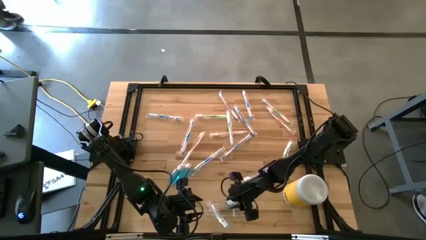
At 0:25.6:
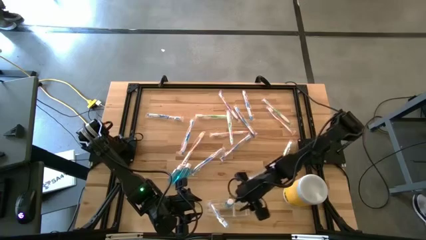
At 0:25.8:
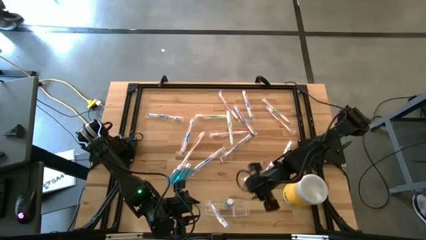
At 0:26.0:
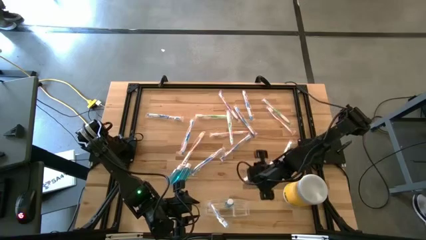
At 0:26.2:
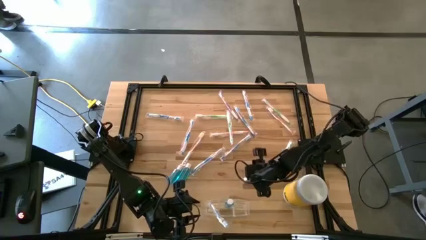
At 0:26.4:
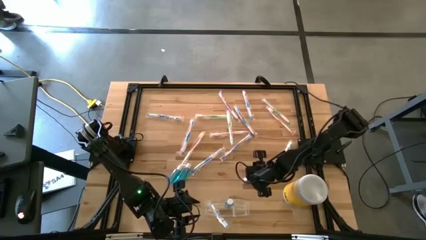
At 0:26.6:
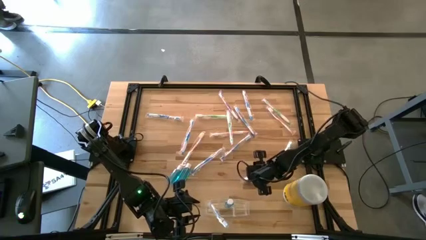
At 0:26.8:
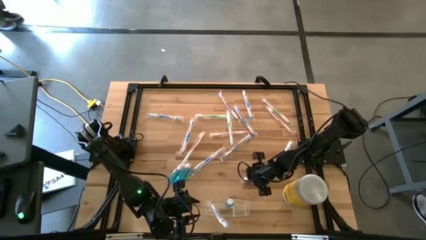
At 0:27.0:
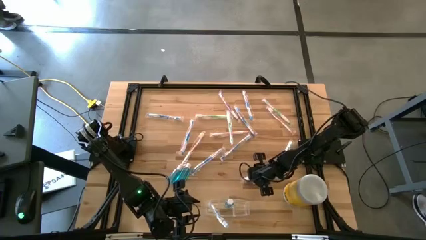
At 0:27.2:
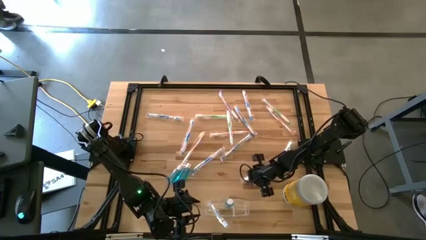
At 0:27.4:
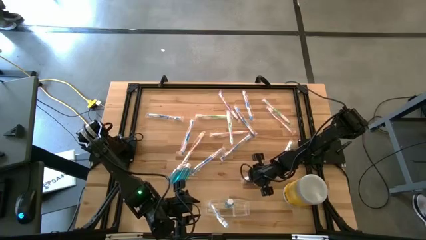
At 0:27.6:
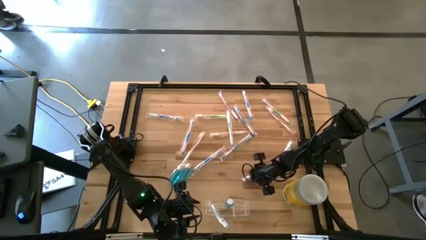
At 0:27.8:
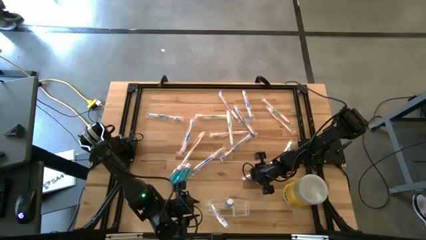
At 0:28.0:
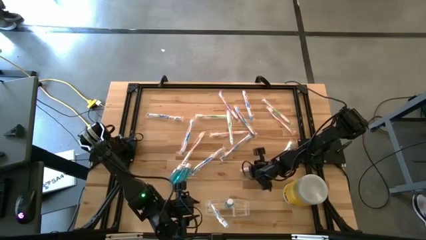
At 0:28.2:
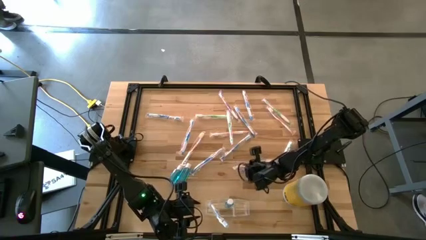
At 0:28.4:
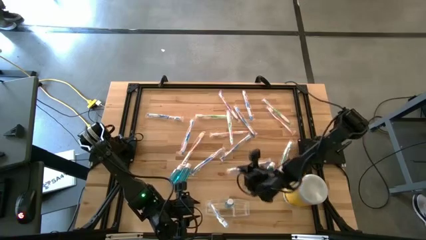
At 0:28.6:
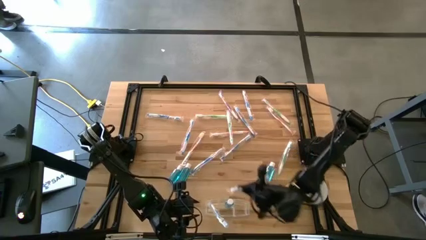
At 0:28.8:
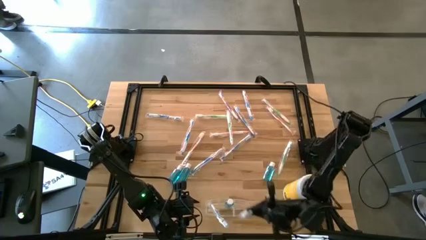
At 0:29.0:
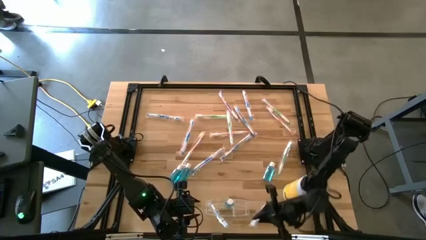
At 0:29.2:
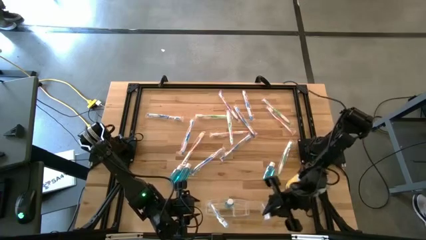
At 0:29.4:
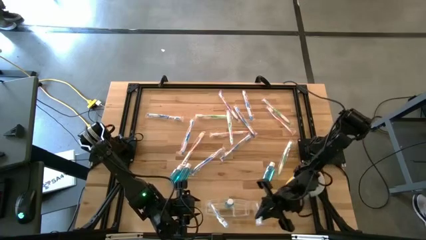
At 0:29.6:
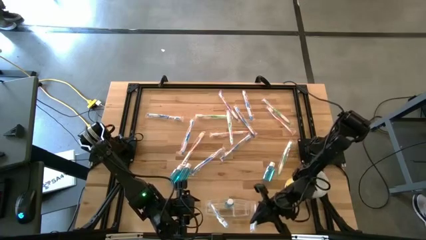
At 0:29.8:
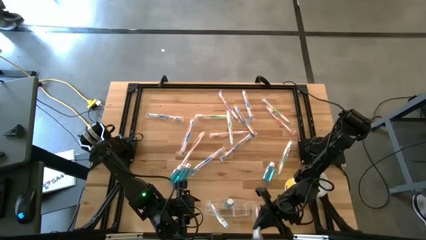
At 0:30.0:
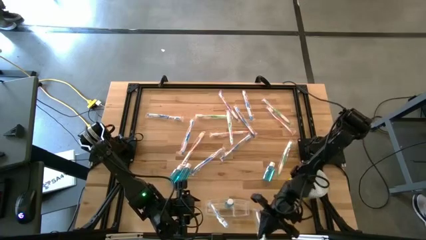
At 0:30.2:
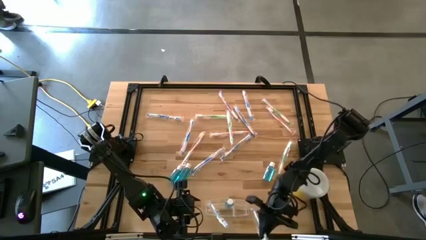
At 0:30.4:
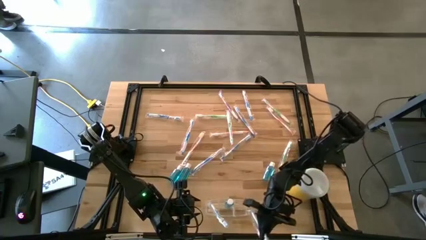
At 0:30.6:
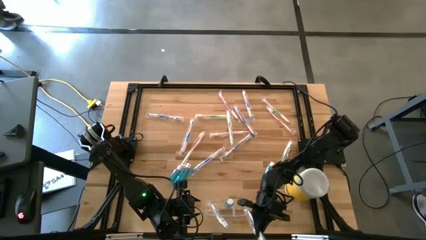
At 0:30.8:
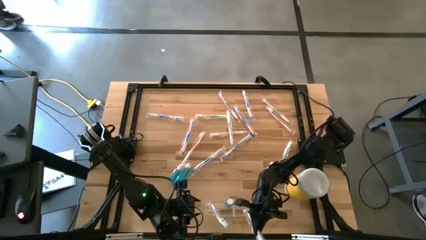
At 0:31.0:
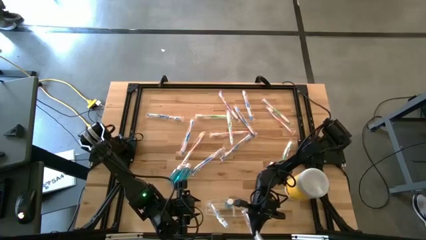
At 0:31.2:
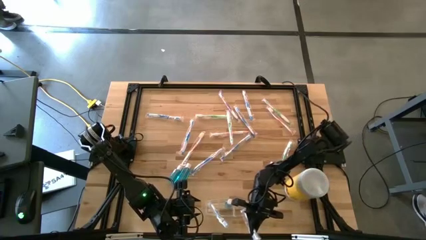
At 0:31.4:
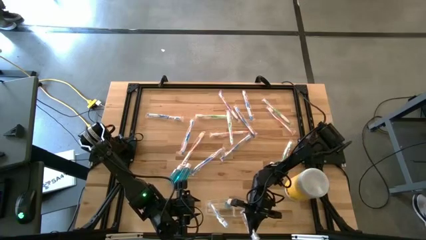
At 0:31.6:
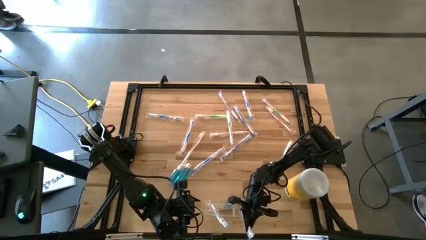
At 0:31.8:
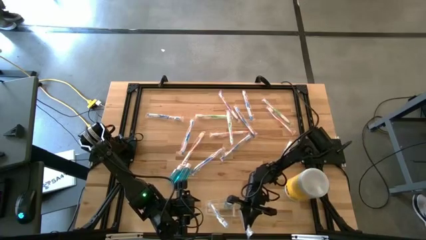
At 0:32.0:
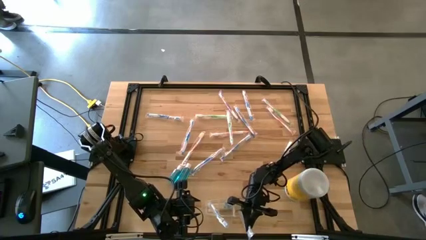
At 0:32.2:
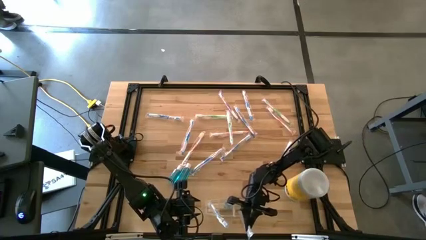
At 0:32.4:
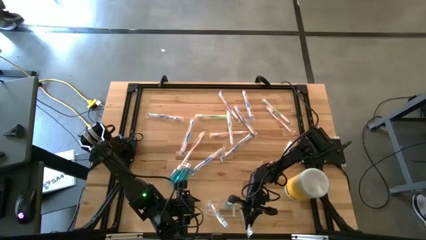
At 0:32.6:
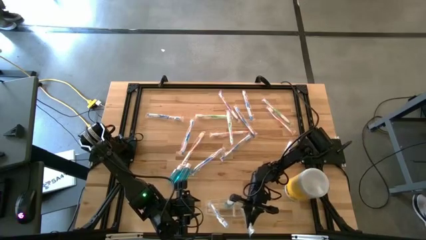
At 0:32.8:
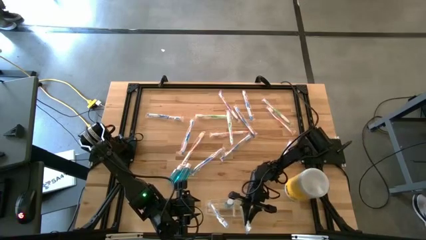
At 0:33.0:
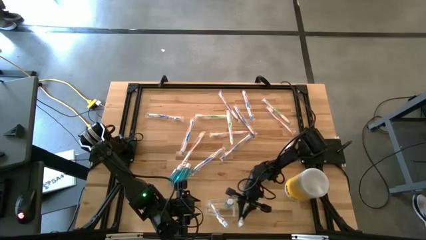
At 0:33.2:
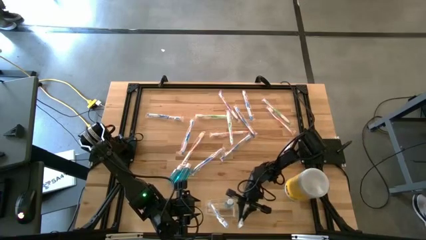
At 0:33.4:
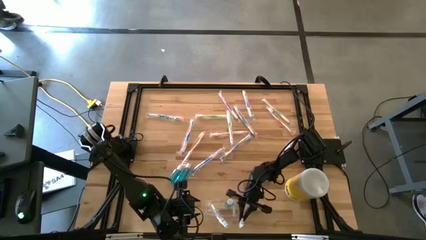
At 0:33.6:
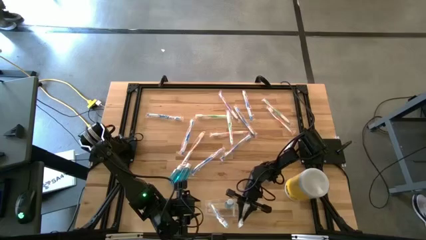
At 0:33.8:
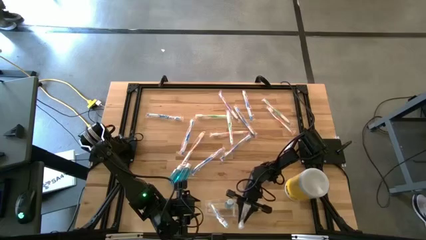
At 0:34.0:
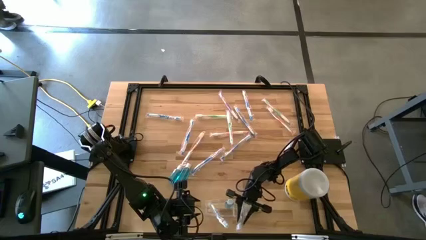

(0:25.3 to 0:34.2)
Task: Pick & Place toothbrushing station
Put the blue toothbrush into the transparent organizer

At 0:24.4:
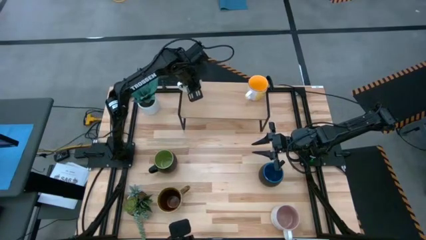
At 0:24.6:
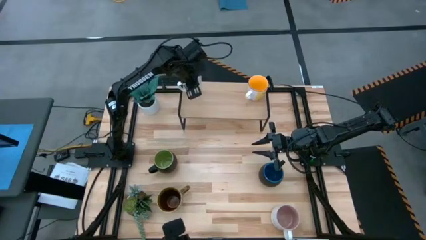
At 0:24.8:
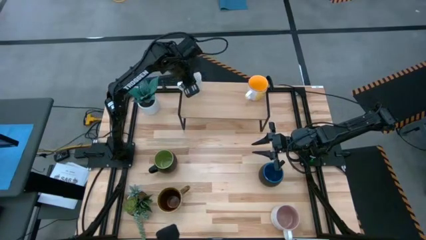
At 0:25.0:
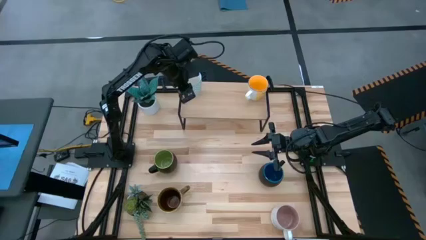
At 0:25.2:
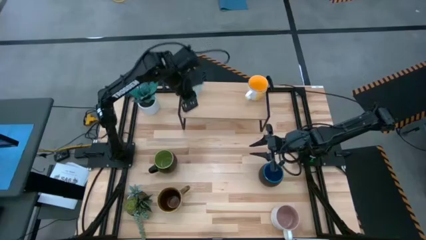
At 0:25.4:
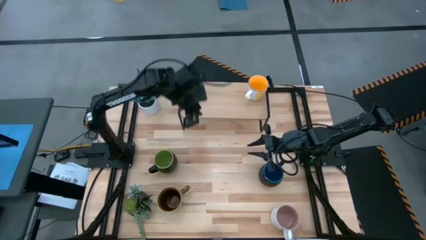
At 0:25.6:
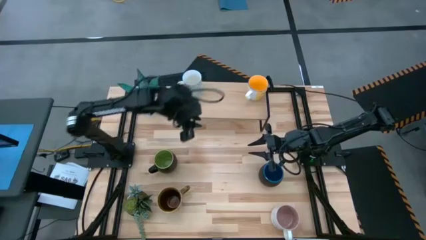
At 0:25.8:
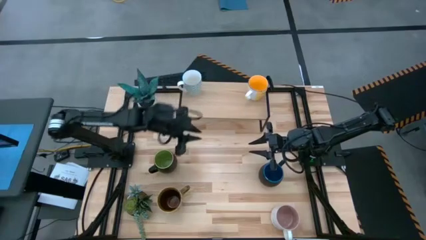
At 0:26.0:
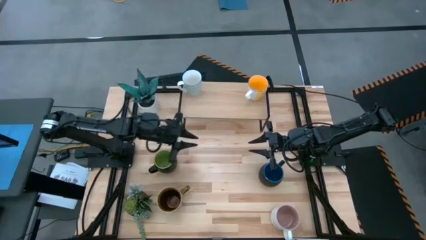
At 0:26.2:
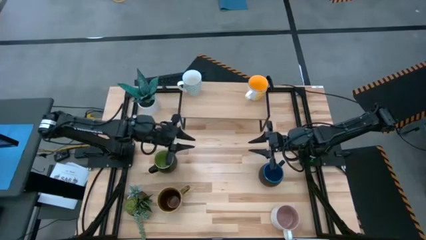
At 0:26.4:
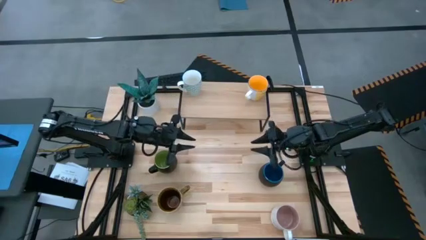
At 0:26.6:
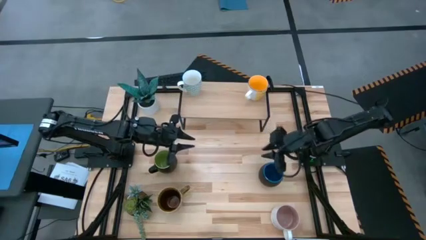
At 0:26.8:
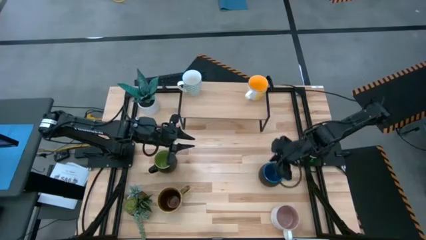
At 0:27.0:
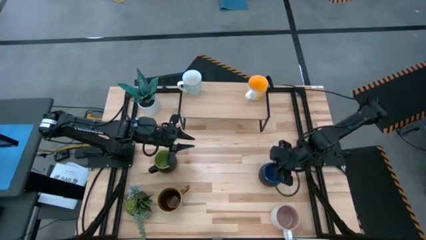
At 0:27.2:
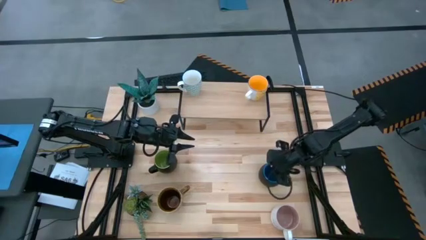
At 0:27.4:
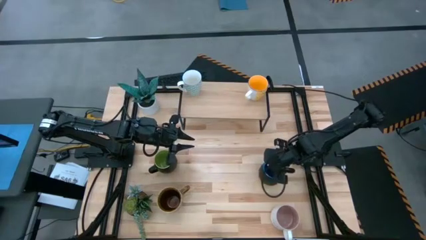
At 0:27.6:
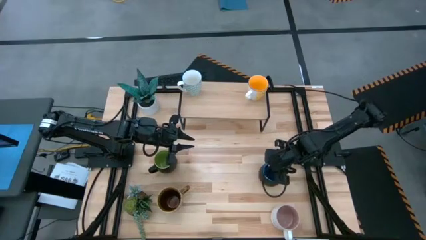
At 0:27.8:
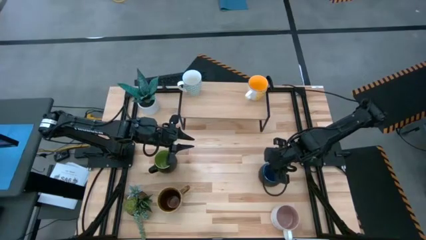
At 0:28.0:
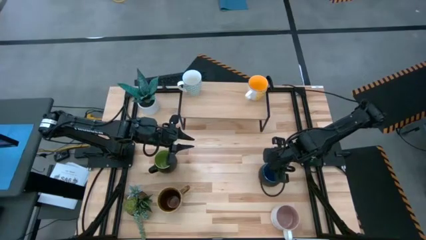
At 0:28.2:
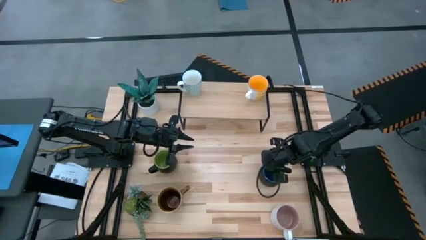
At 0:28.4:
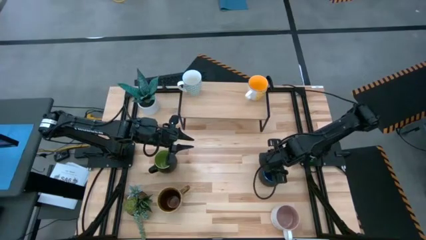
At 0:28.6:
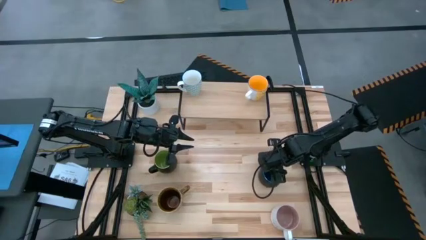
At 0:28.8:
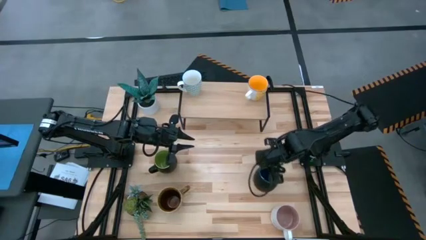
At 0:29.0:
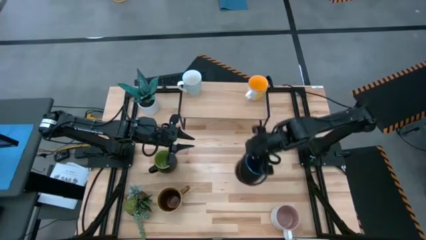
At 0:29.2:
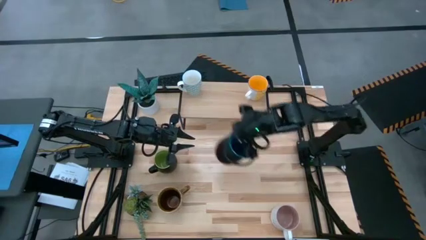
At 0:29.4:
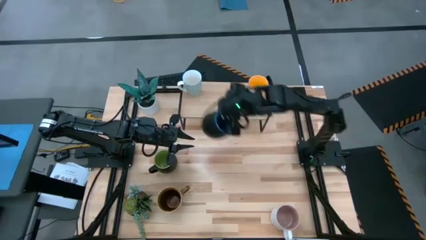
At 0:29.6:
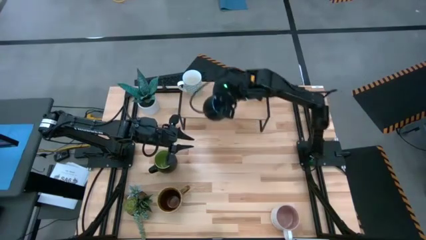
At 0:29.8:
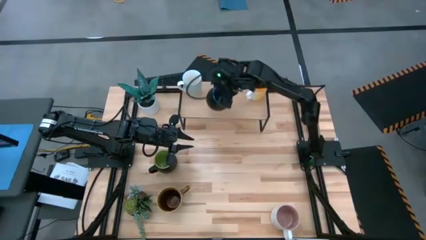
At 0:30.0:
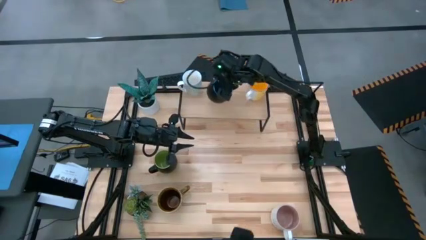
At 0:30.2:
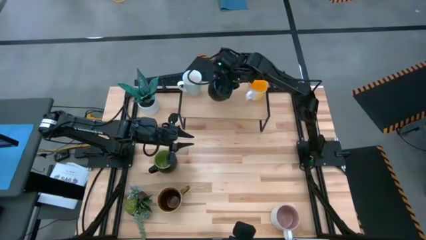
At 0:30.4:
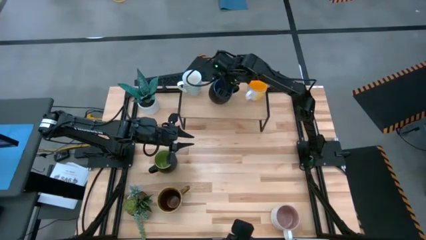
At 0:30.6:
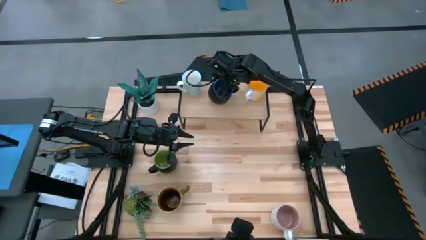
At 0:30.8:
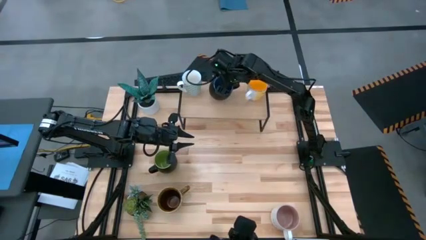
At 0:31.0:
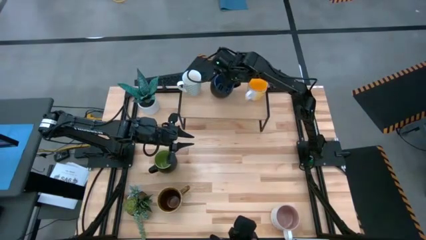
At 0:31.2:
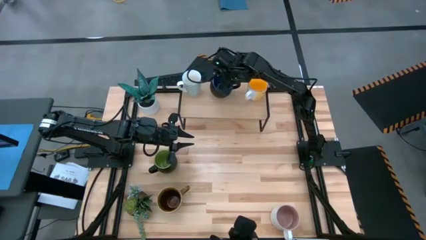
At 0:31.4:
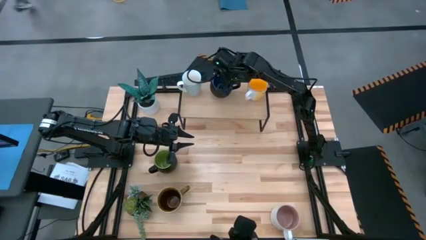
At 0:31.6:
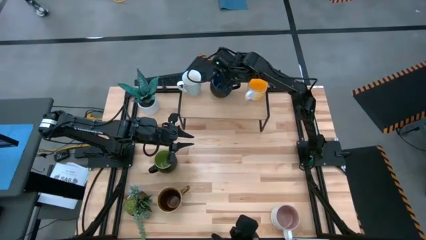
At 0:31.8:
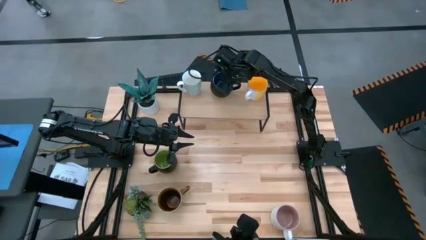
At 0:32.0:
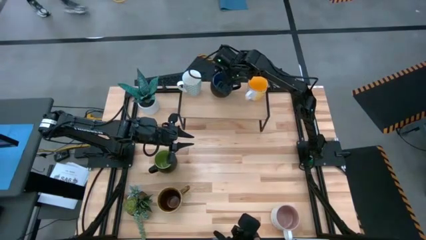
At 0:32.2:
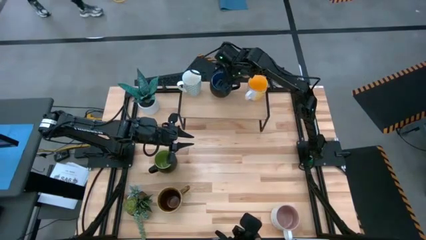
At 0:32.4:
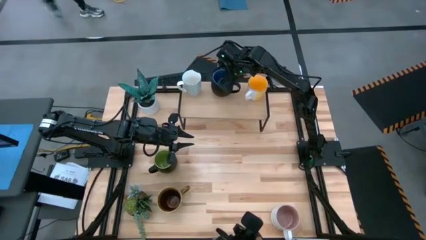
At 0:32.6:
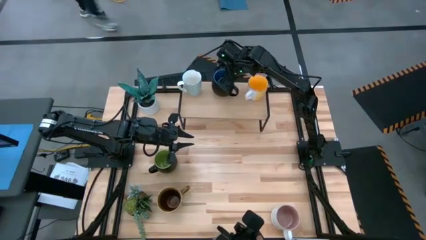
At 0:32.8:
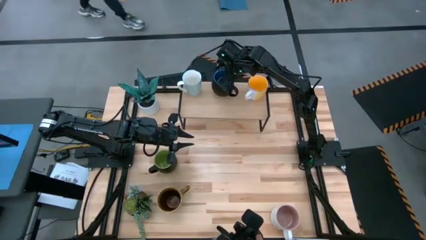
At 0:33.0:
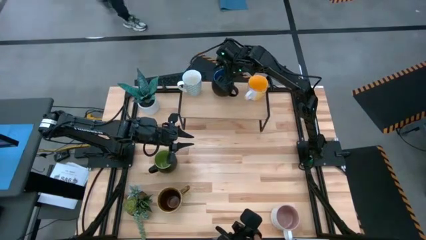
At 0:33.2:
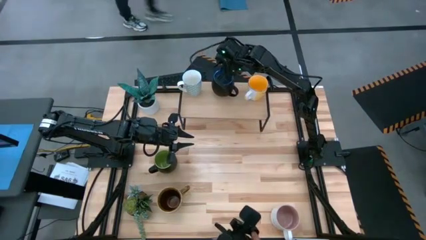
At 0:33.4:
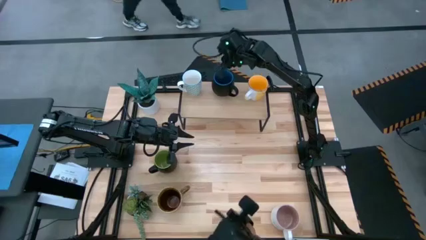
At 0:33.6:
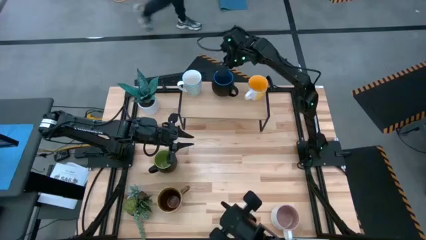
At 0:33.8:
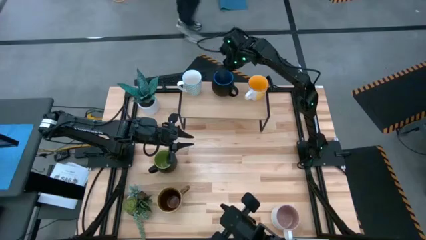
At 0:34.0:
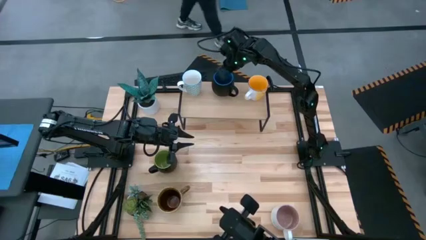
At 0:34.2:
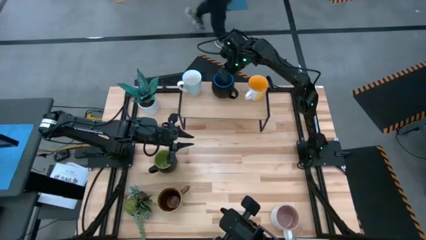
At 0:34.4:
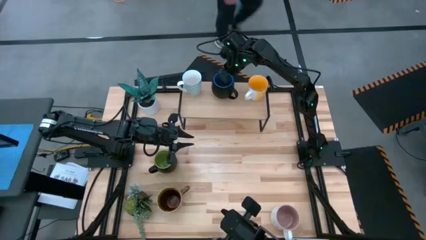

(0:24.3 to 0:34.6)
Task: Place coffee mugs
Put the black blue mug on the shelf
